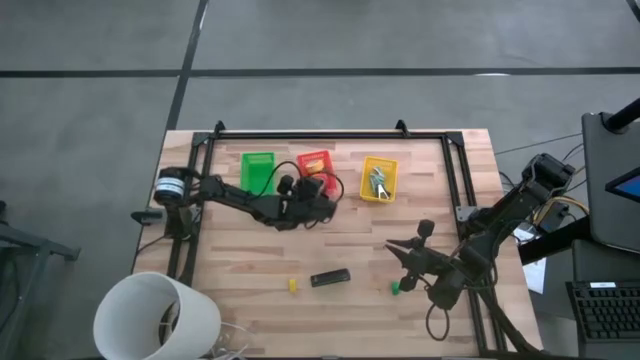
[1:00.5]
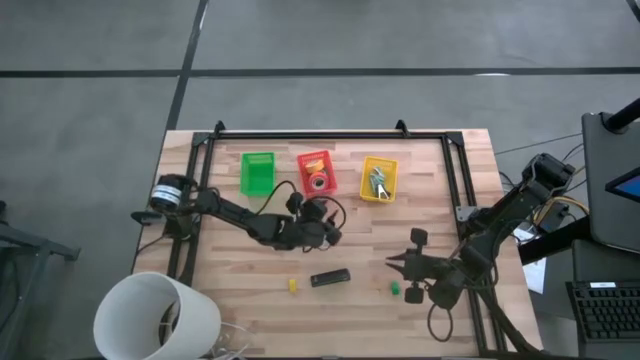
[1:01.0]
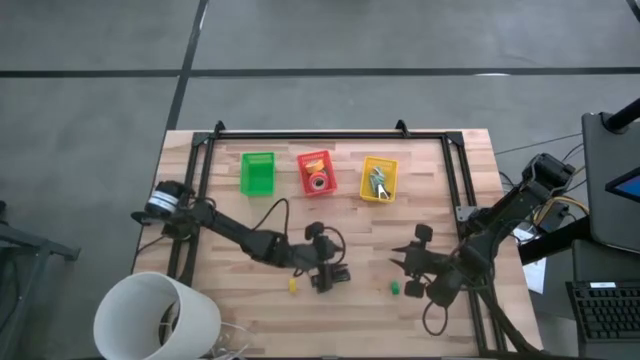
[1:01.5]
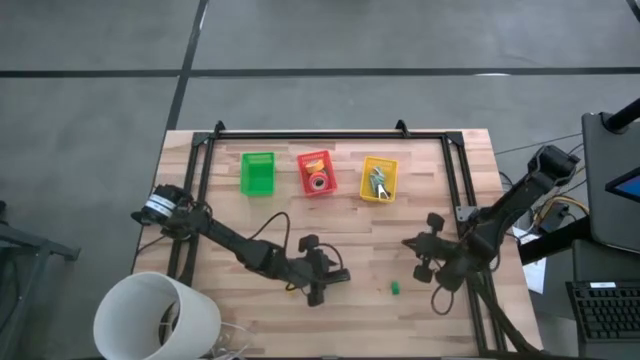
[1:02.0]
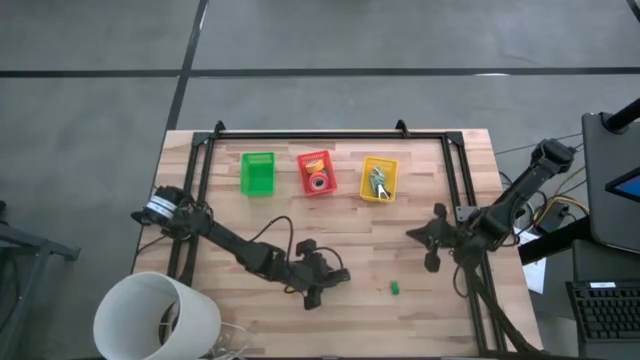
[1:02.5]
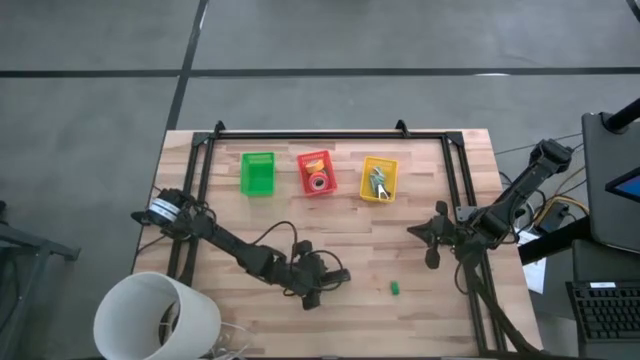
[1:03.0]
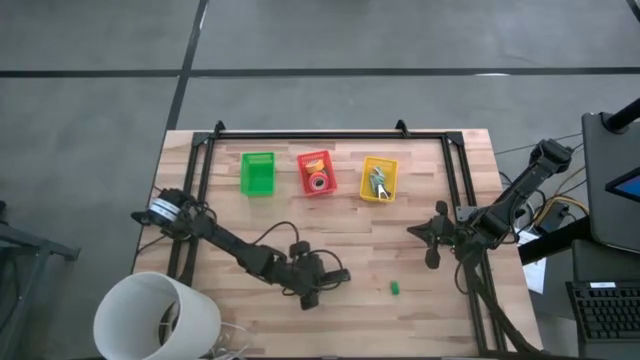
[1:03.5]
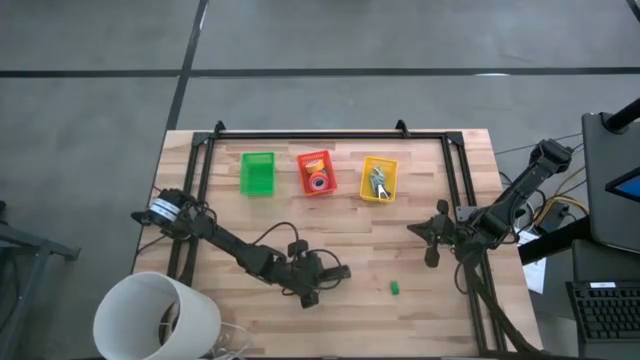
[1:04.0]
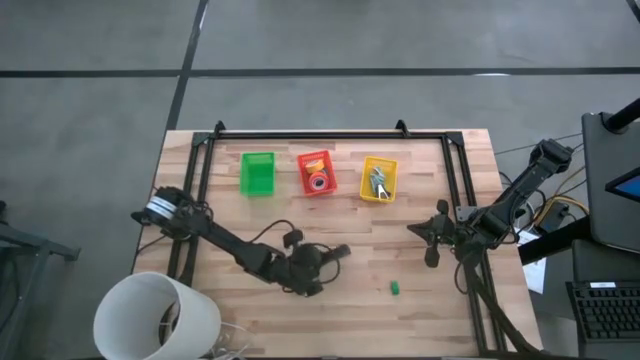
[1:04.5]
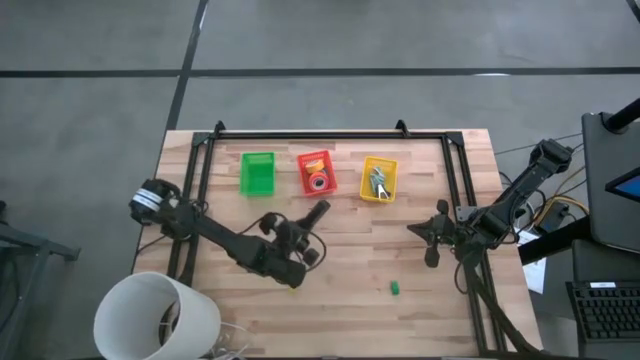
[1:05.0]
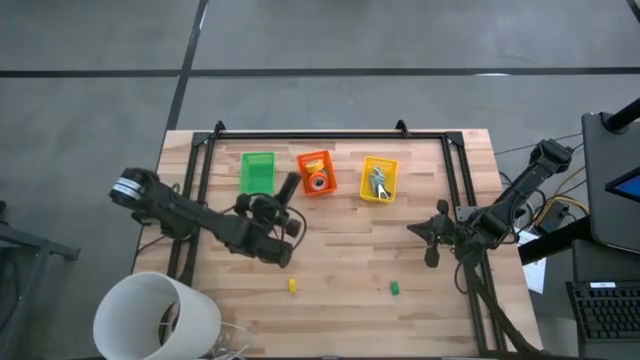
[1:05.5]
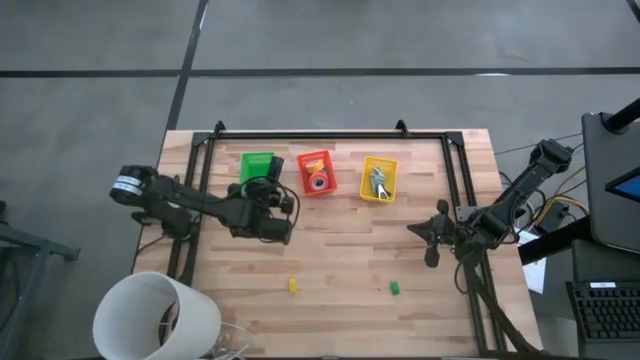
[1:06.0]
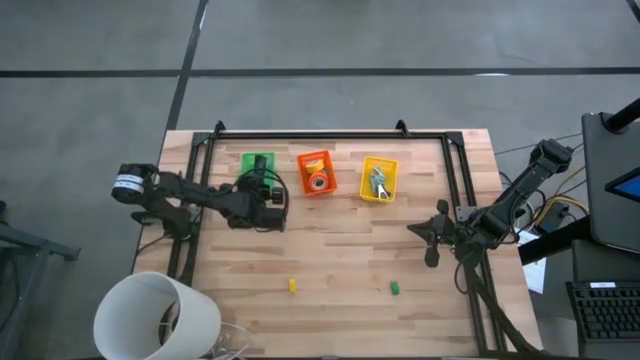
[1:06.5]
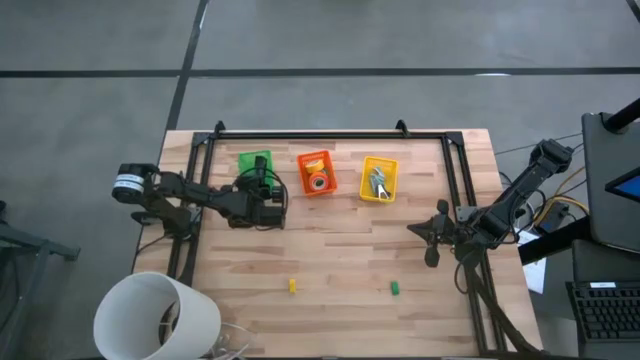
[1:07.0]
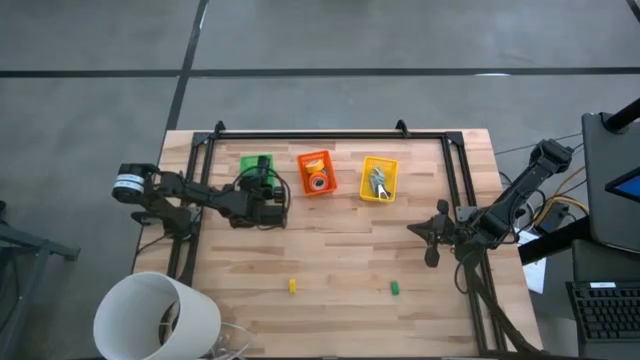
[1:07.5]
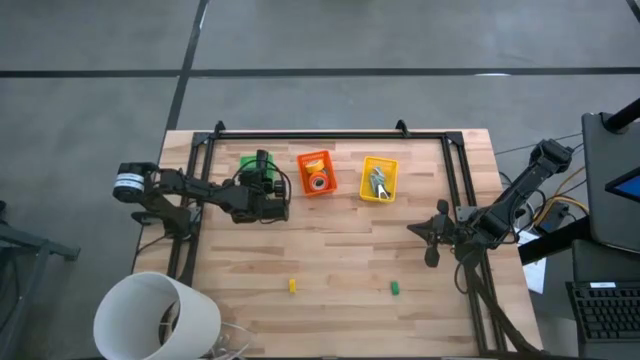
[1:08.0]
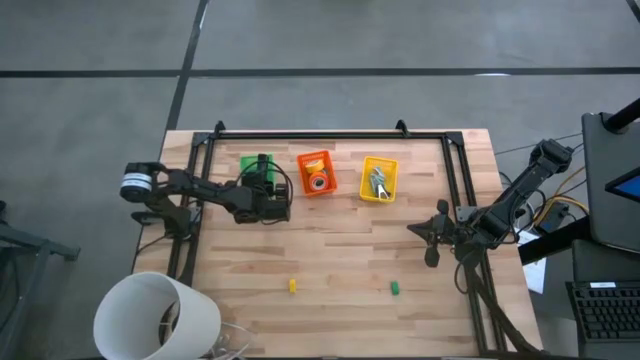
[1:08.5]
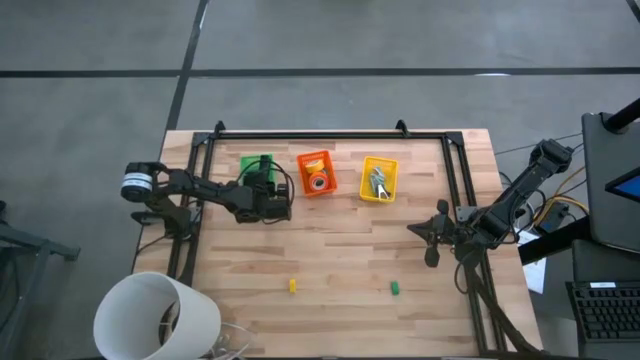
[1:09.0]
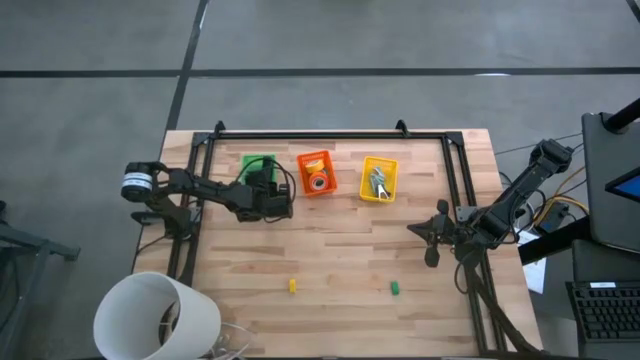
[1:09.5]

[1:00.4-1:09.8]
Task: Pick and place Stapler, Stapler remover, tape
Put the black stapler into the green bin

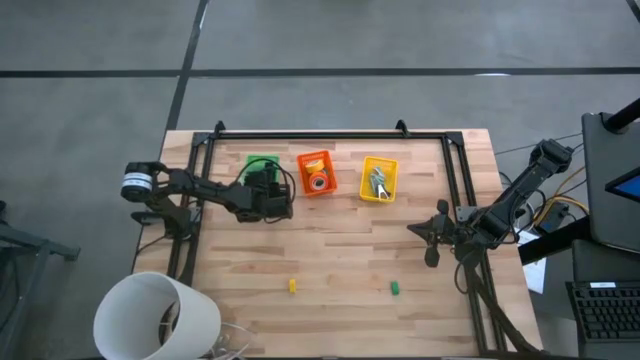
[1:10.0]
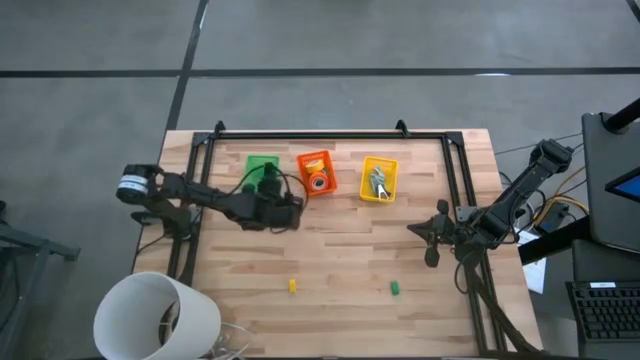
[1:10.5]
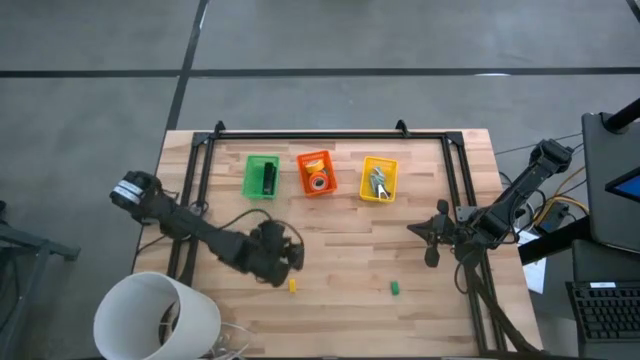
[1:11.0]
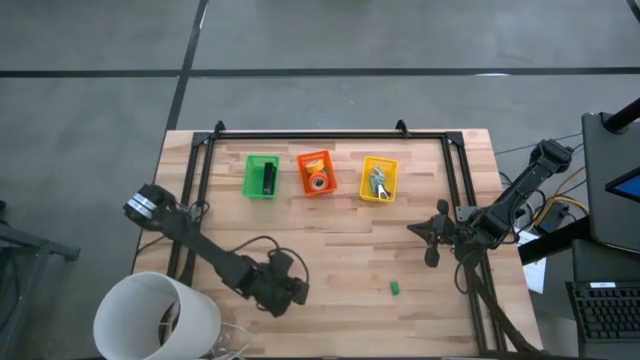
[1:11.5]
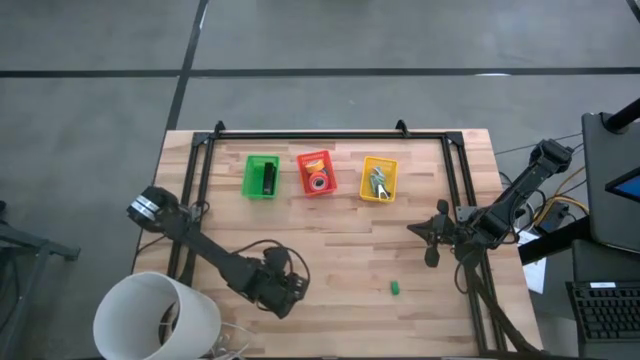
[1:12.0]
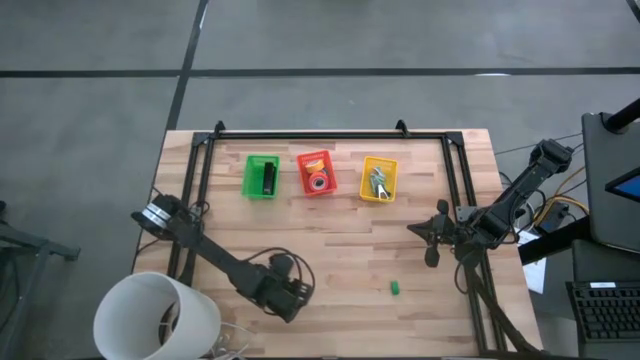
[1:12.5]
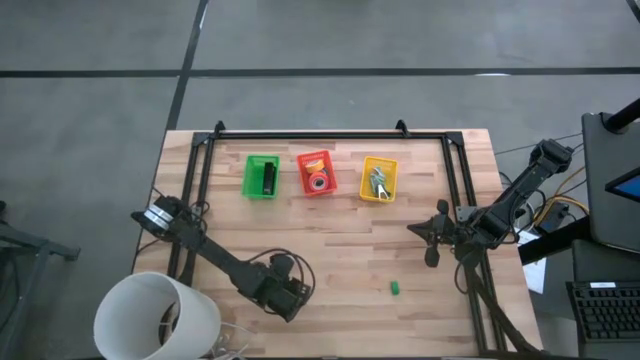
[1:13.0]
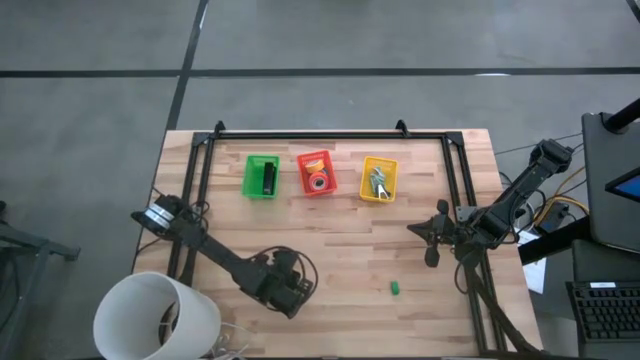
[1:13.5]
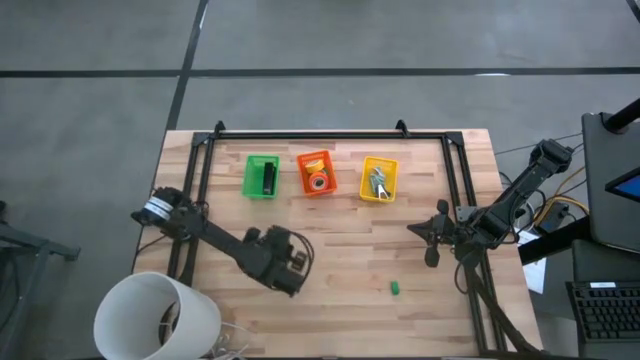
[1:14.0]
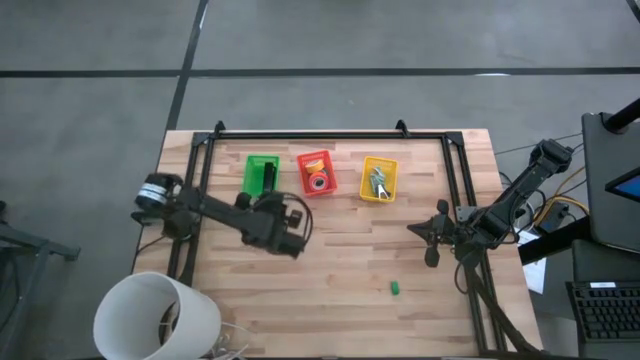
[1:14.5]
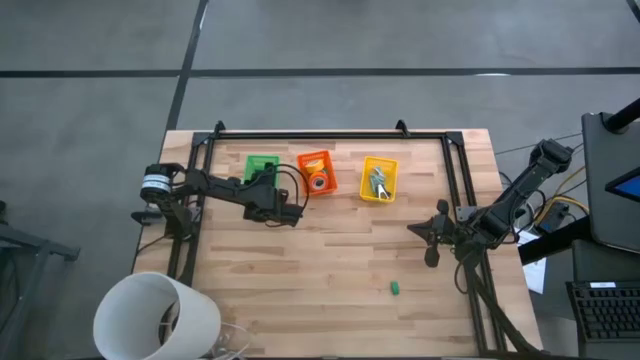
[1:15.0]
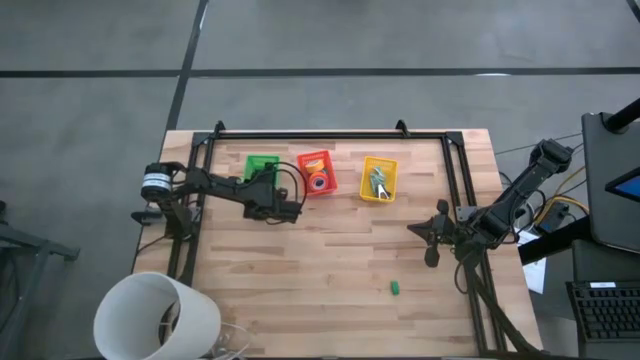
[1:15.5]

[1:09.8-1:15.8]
Put the yellow stapler into the green bin

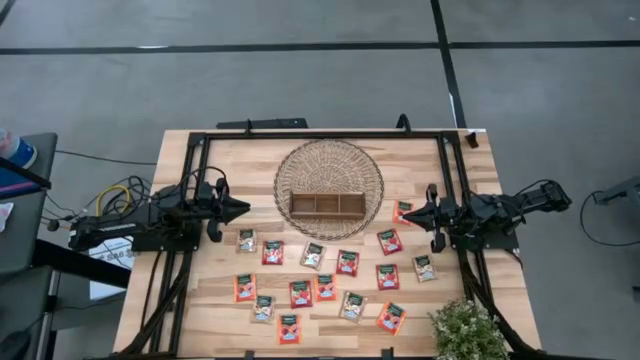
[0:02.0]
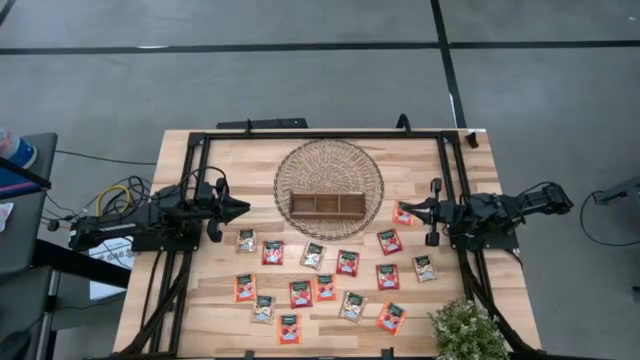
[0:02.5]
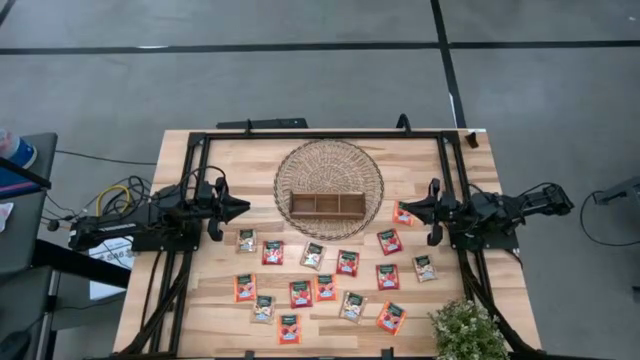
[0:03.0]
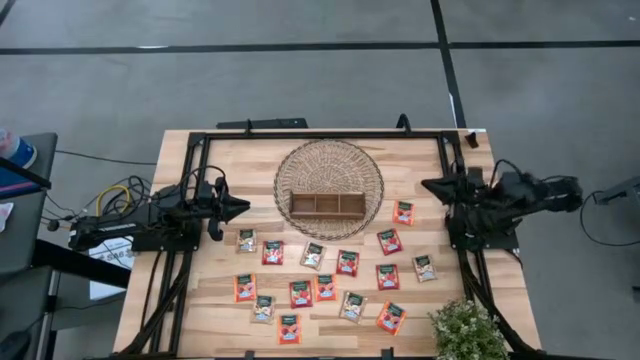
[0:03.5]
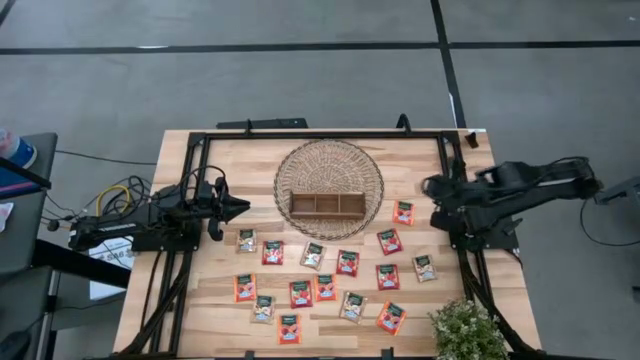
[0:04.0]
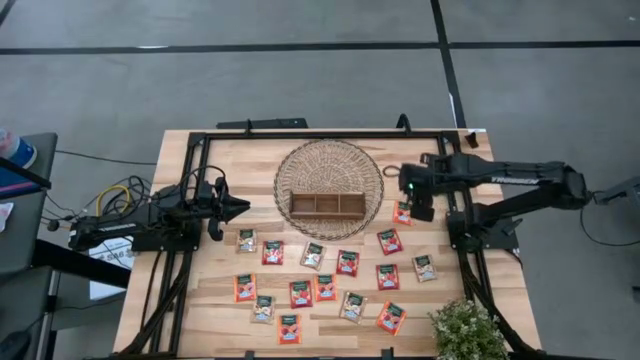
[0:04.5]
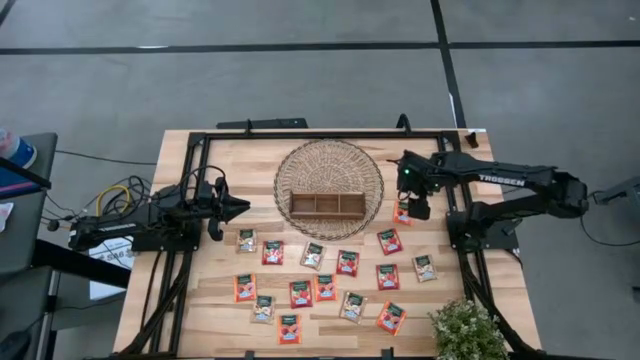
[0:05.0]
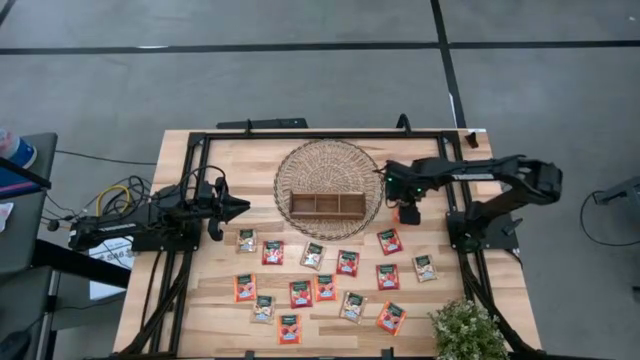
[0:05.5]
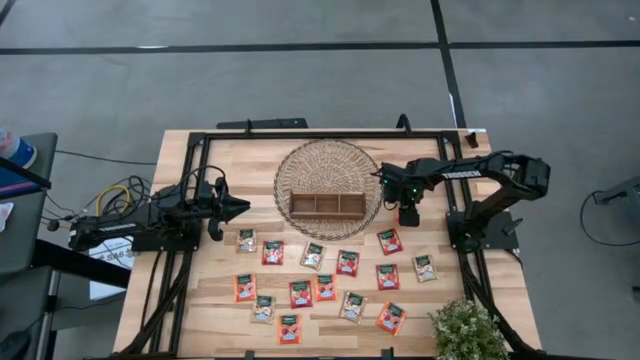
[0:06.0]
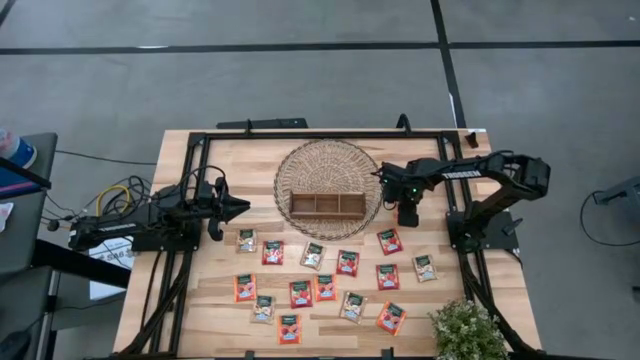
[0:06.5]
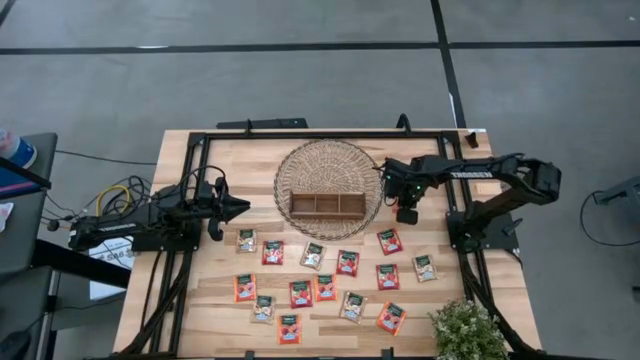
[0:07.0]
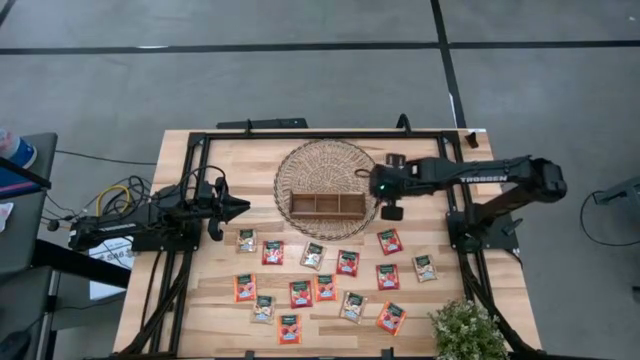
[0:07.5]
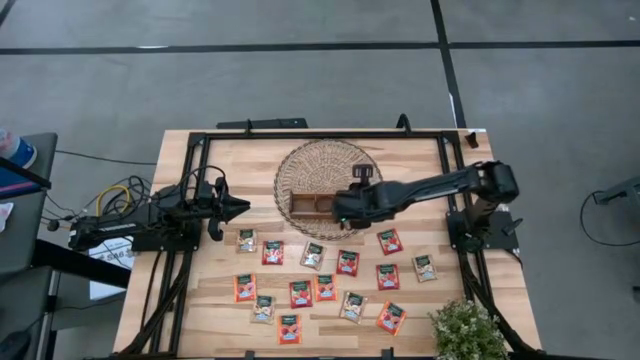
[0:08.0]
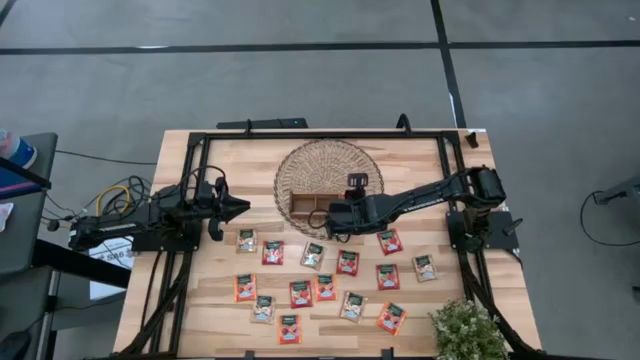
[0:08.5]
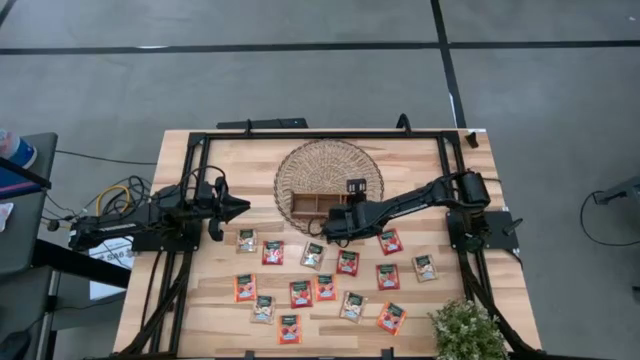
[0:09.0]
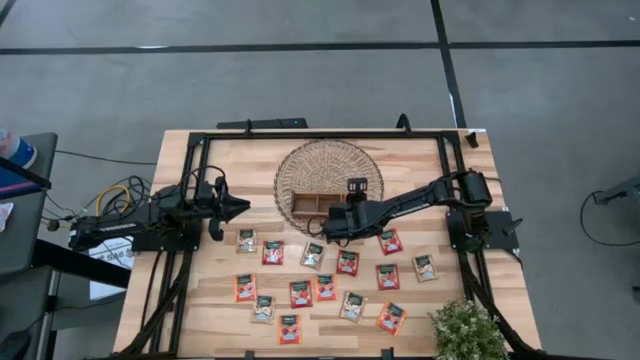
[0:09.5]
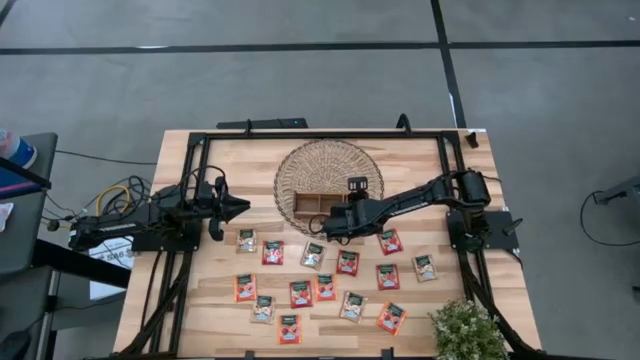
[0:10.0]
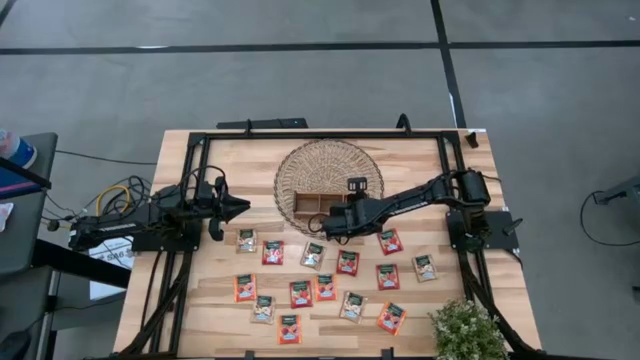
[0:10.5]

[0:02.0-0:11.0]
Task: Pick & Place Tea
Put the orange tea bag into the right section of the wooden organizer
